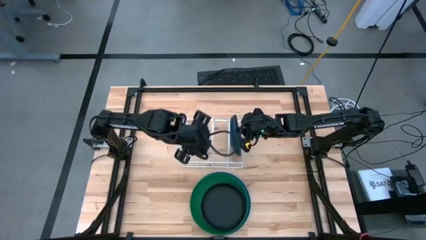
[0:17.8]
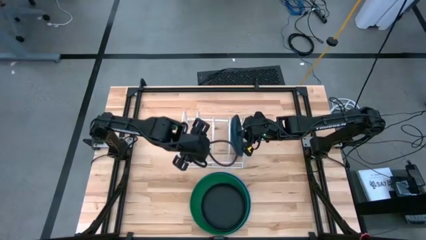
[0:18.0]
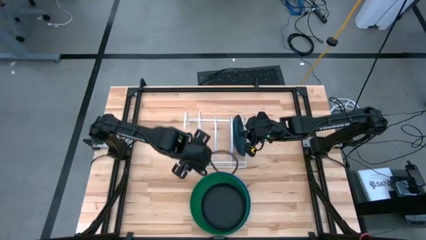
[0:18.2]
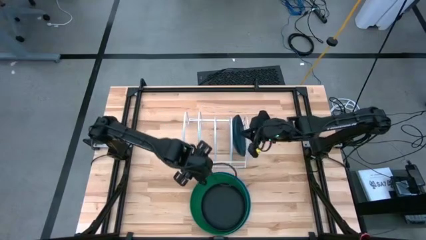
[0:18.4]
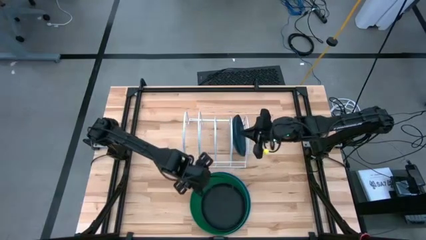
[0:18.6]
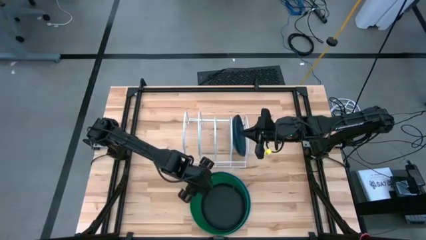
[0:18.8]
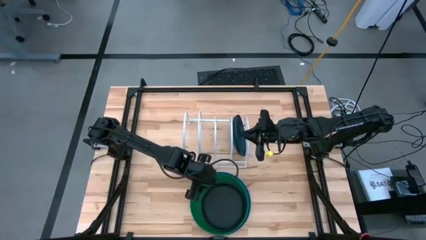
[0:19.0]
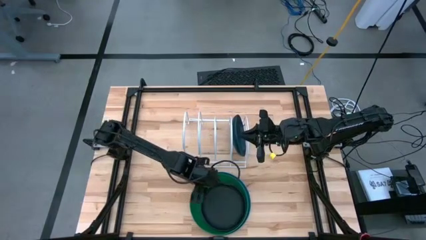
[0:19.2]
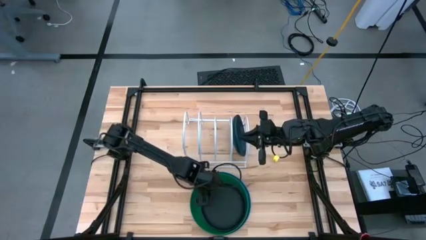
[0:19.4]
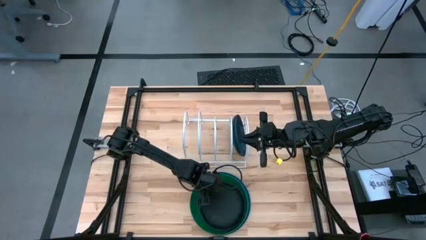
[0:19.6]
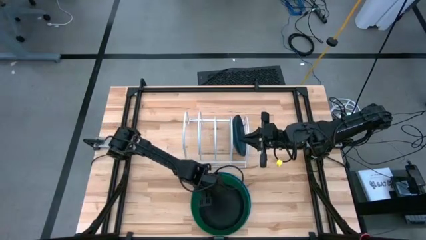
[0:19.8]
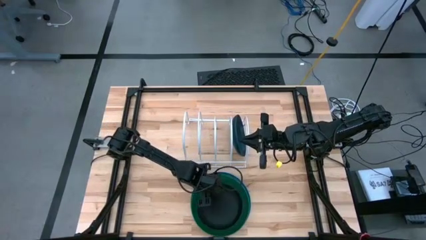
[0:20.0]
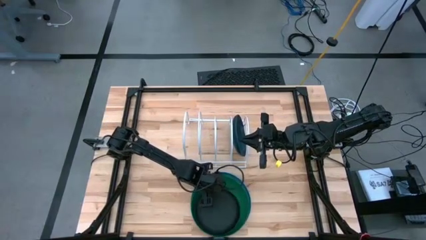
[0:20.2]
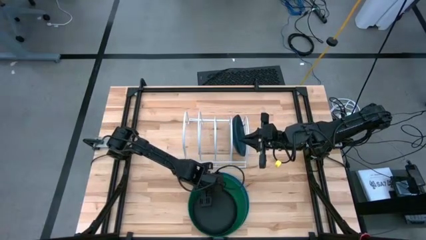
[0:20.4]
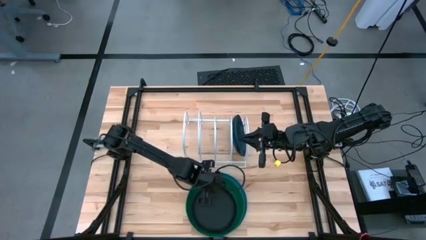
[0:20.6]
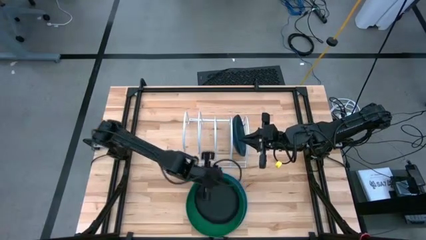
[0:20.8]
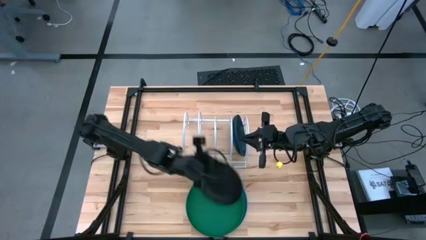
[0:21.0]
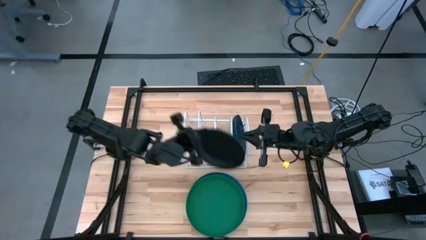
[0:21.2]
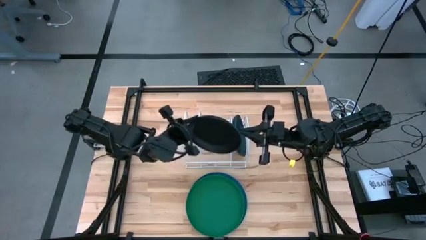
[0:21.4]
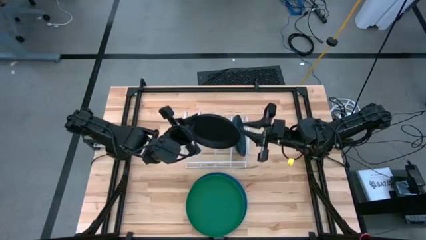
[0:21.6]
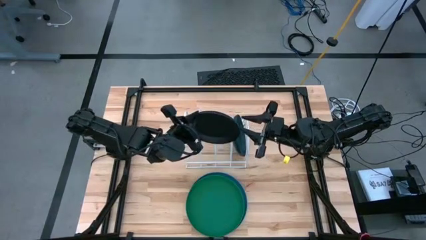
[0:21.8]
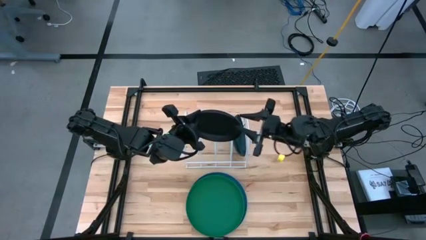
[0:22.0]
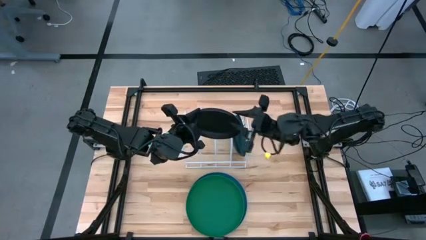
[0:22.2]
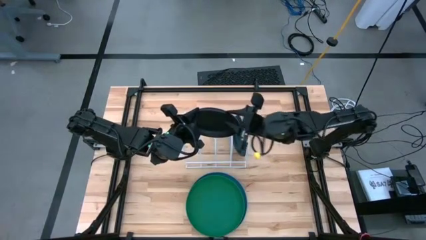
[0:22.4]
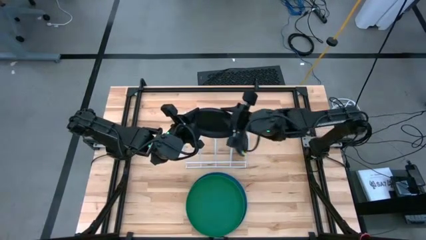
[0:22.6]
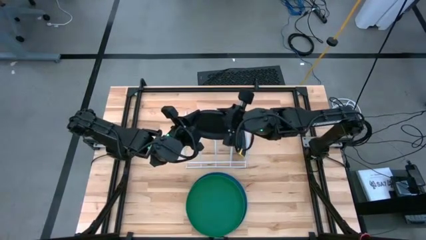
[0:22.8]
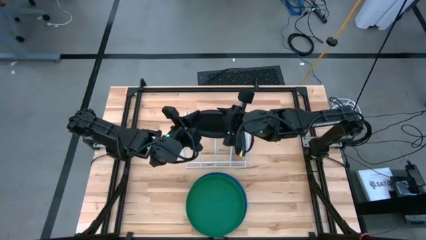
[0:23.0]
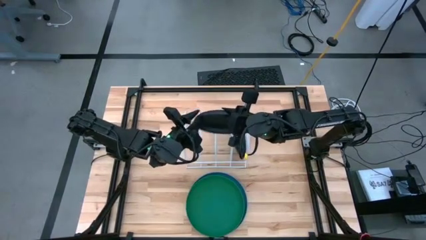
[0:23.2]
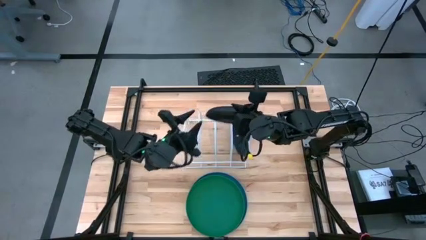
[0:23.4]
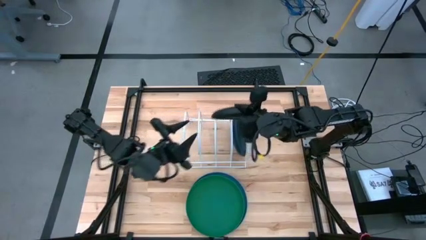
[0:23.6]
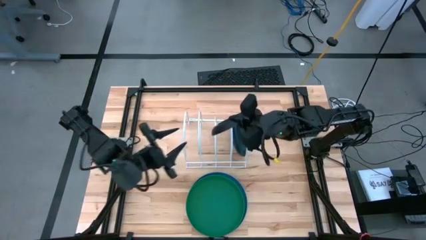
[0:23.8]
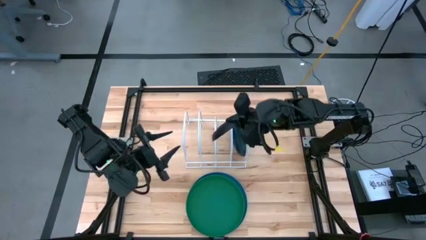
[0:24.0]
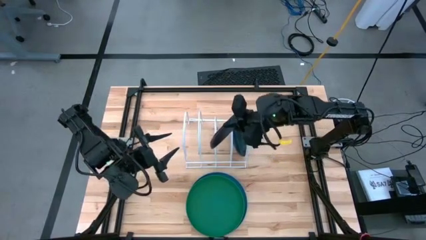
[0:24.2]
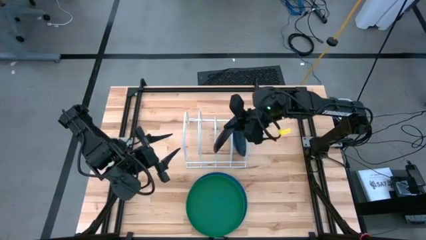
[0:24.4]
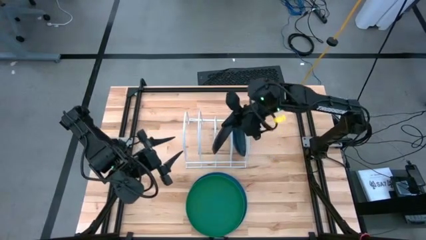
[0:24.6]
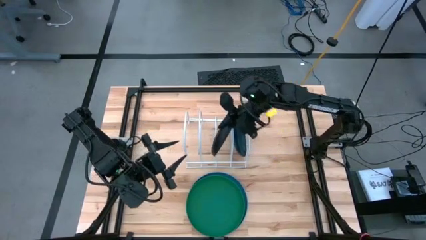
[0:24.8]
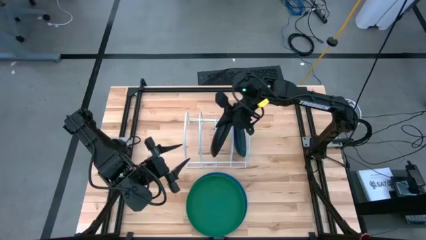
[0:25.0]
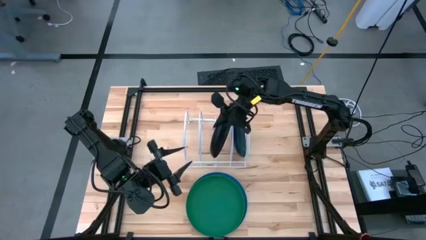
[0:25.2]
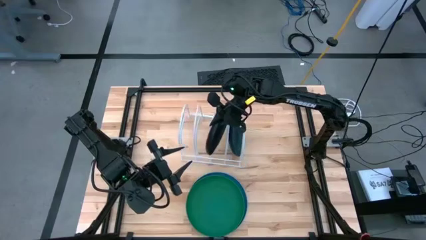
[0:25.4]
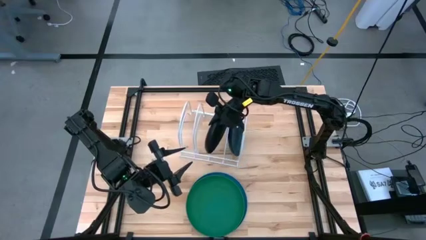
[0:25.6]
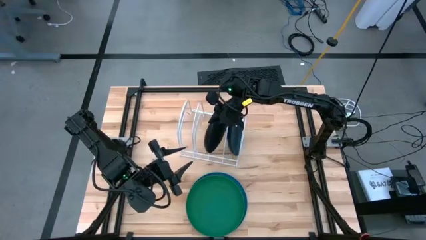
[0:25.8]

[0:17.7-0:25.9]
Task: Sort dishes
Put the black plate into the dish rack

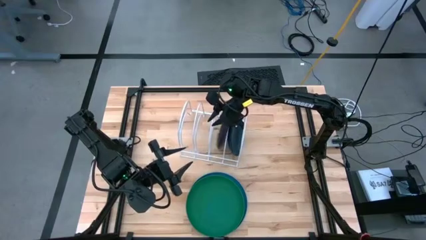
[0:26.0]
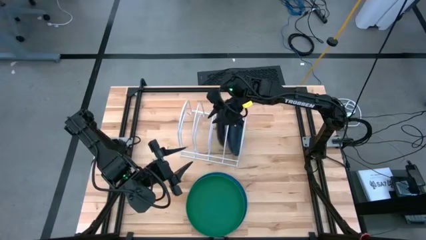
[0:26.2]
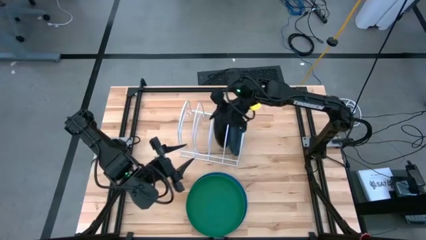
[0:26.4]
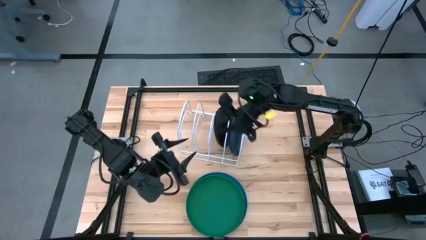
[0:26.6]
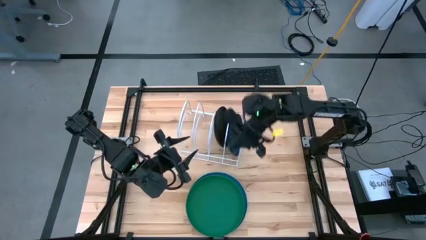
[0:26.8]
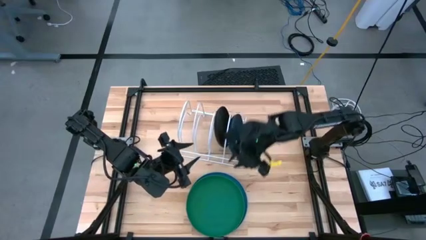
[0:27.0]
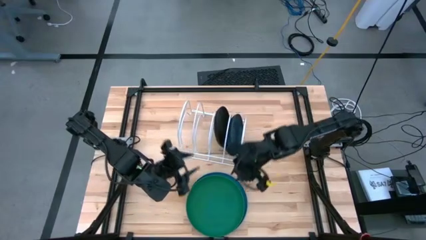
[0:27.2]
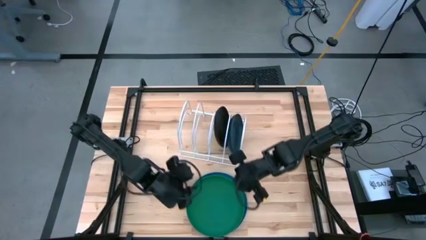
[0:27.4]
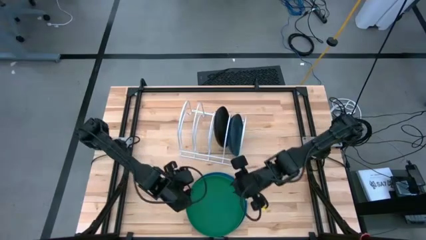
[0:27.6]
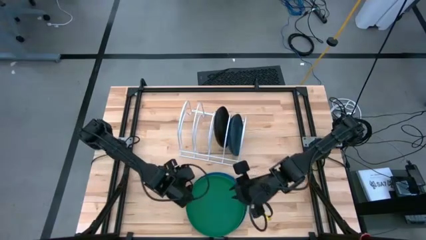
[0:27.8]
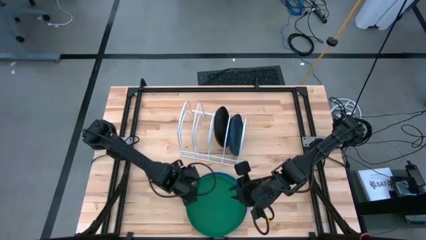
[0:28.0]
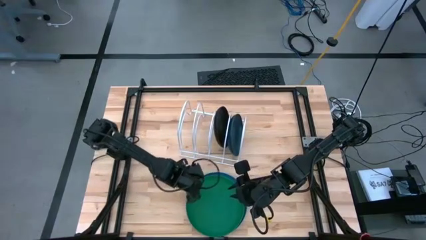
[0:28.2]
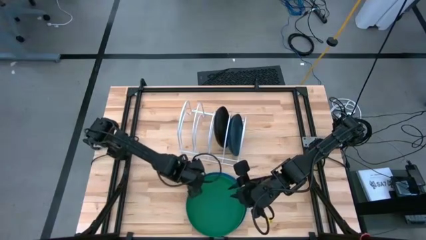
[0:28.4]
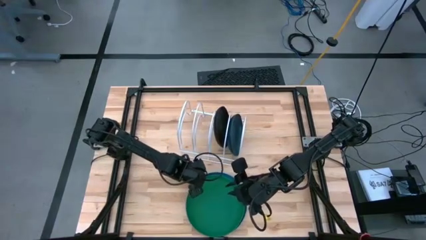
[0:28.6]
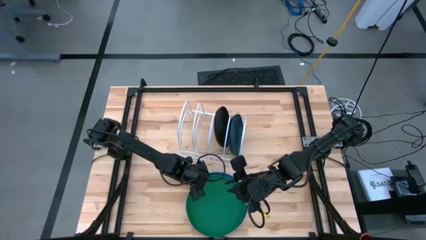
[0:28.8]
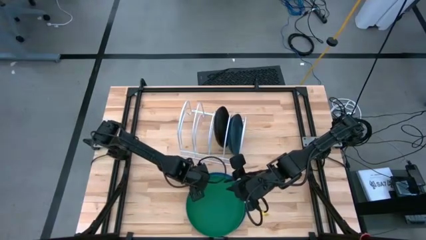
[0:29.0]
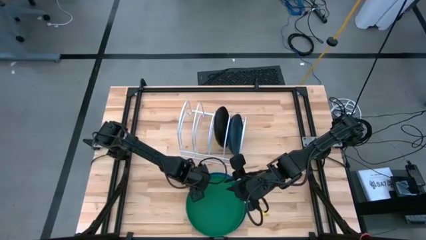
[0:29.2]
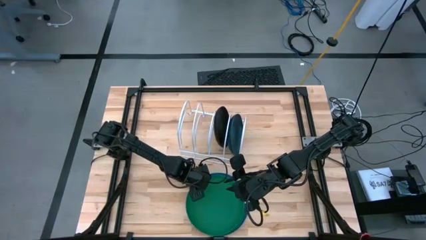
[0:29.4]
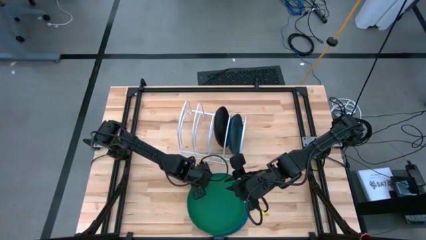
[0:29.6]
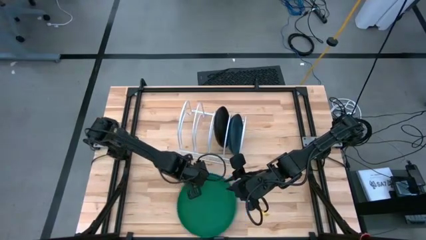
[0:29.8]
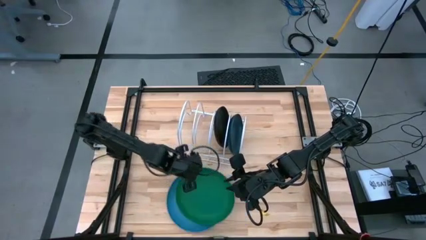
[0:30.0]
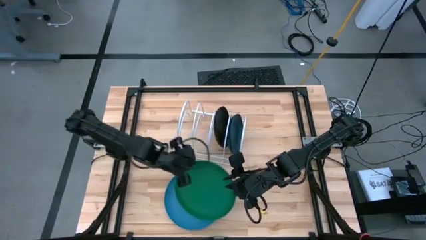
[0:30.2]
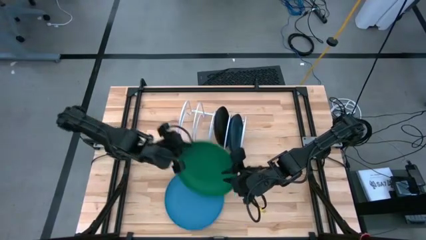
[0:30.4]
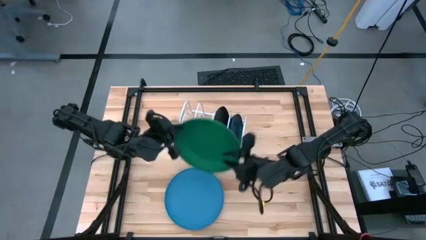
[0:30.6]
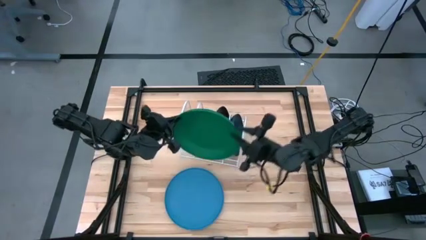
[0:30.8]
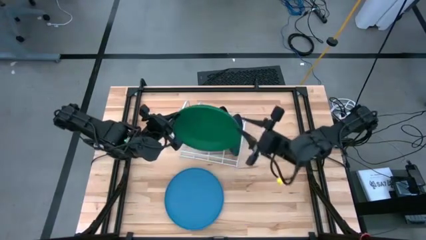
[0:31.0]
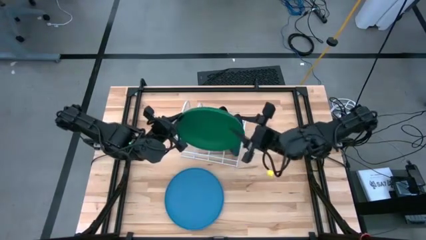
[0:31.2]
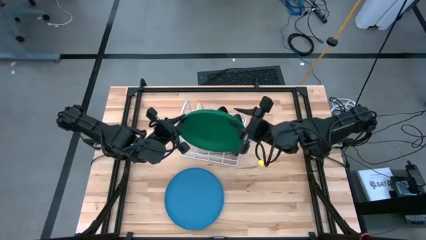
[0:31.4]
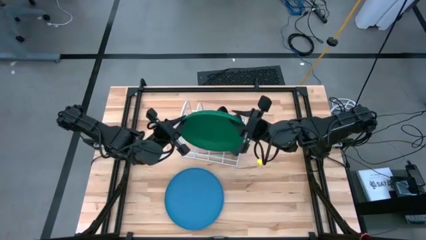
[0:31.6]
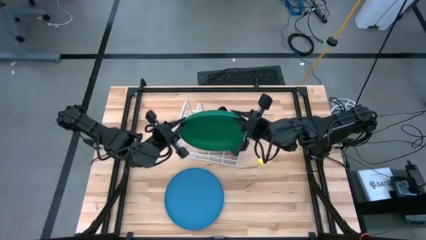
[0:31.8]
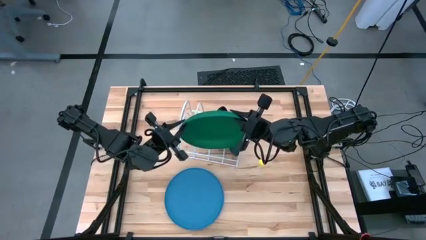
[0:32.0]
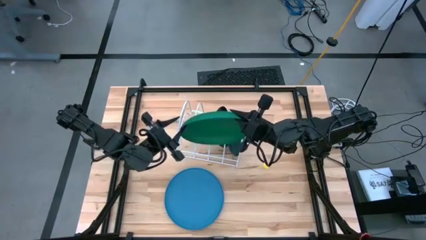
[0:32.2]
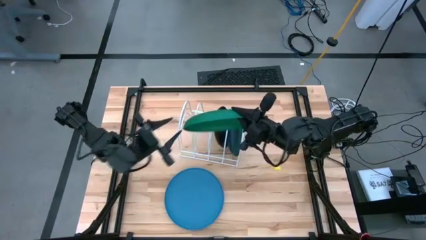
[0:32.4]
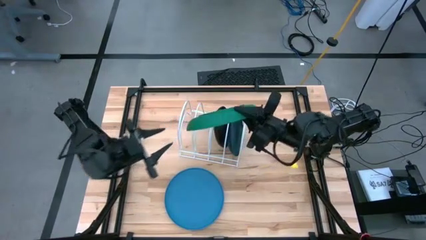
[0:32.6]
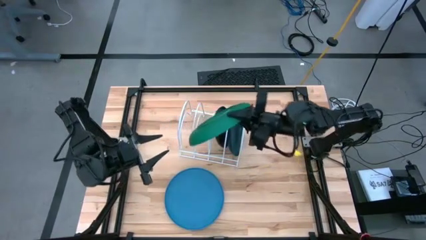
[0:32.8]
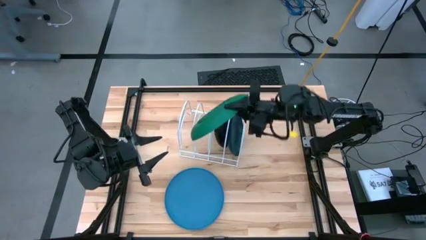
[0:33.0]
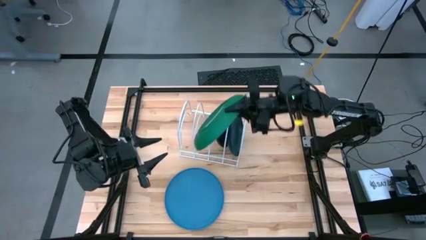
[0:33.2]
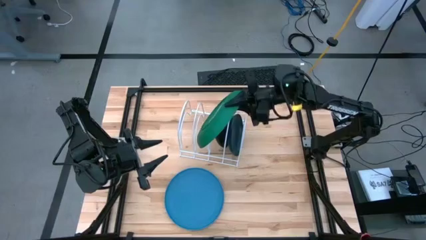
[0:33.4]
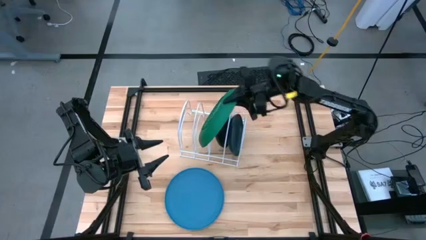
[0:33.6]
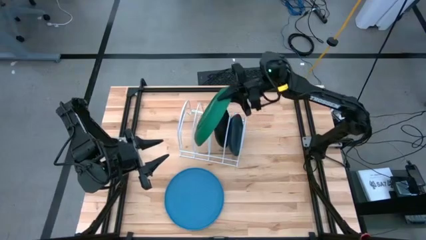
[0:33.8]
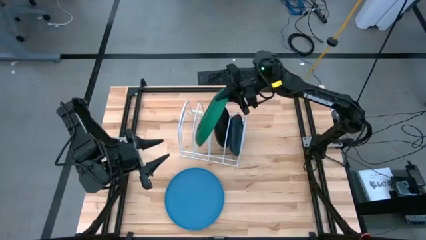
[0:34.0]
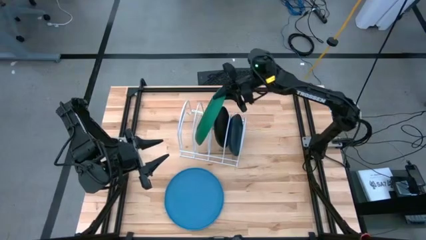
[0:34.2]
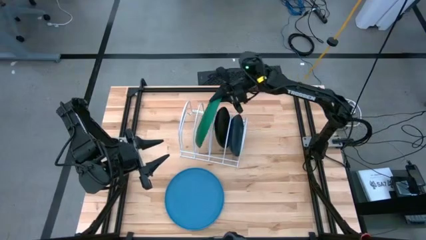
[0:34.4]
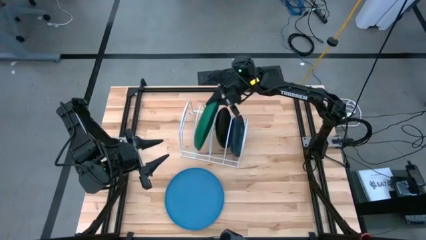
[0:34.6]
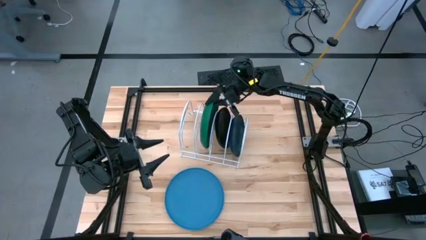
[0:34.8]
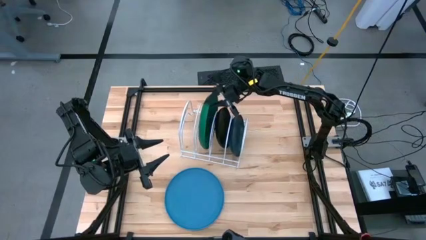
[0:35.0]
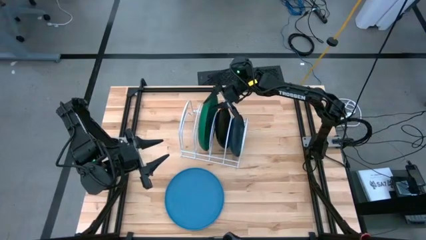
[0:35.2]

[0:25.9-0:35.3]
Put the green plate into the dish rack
